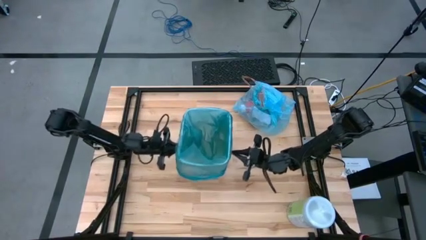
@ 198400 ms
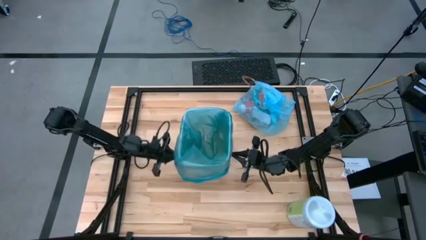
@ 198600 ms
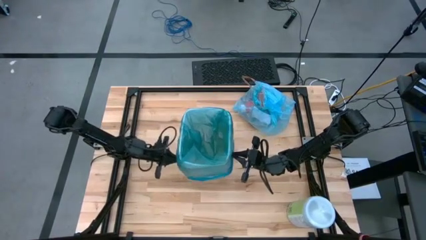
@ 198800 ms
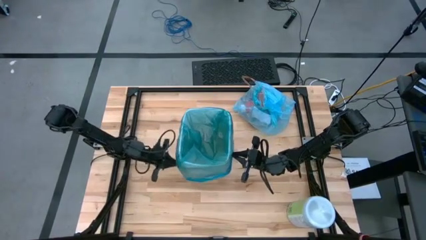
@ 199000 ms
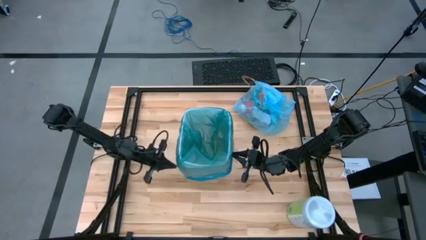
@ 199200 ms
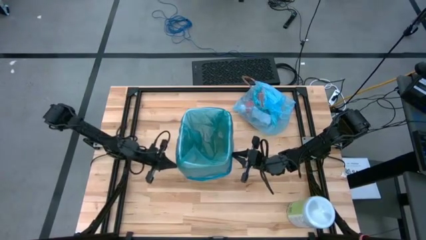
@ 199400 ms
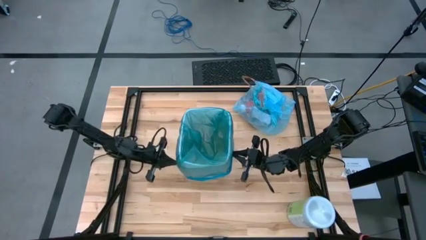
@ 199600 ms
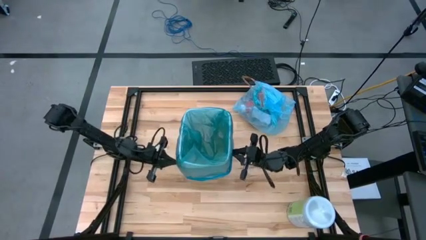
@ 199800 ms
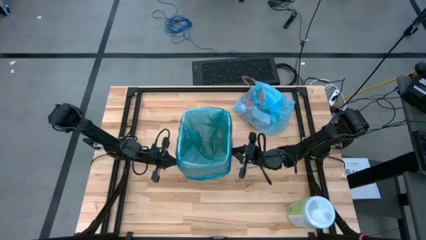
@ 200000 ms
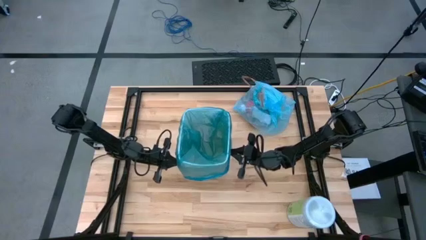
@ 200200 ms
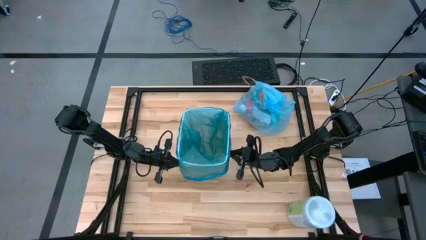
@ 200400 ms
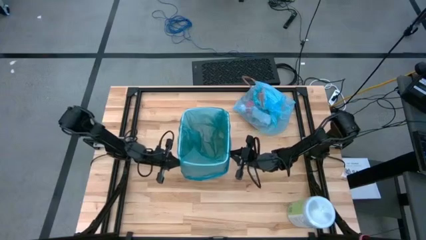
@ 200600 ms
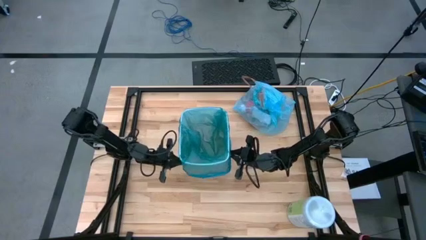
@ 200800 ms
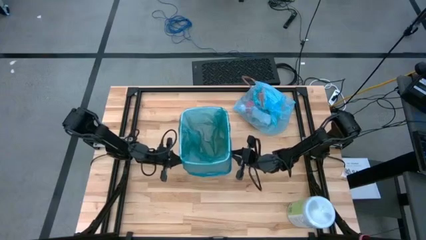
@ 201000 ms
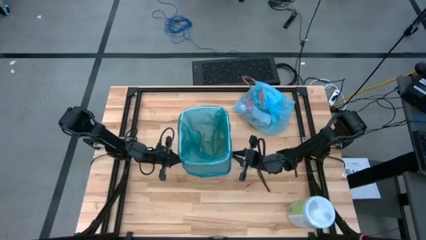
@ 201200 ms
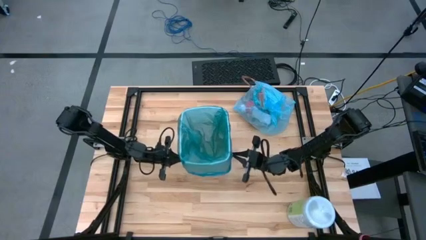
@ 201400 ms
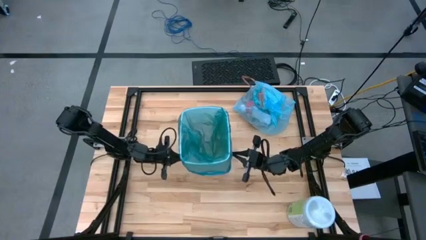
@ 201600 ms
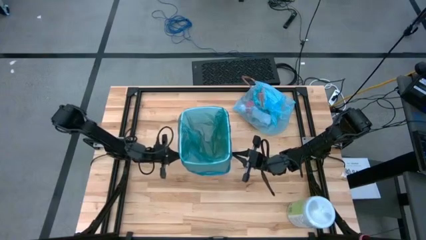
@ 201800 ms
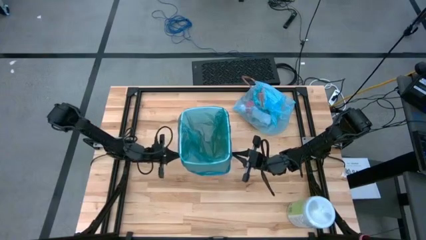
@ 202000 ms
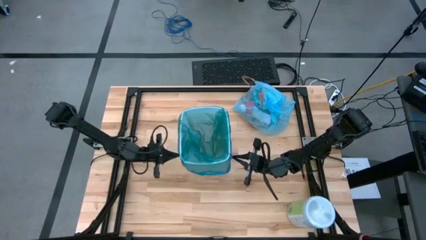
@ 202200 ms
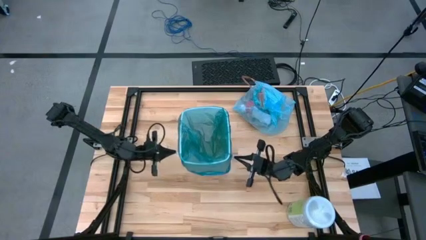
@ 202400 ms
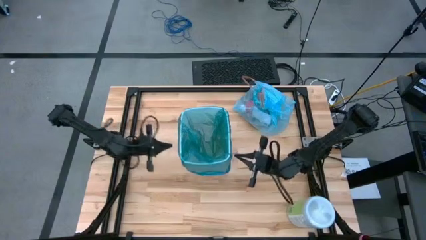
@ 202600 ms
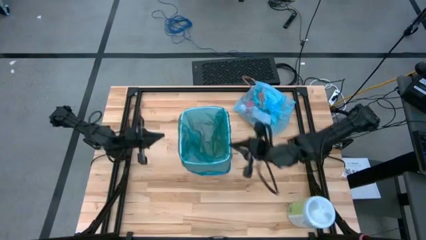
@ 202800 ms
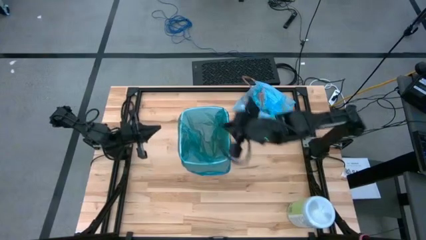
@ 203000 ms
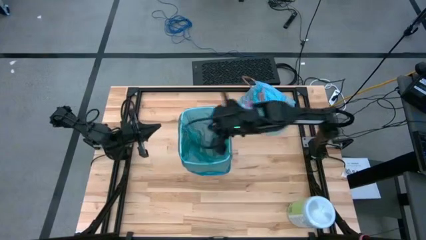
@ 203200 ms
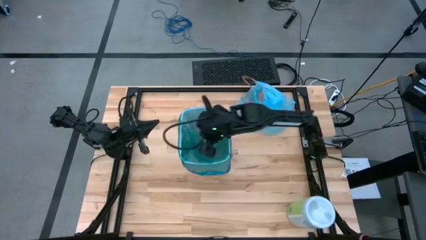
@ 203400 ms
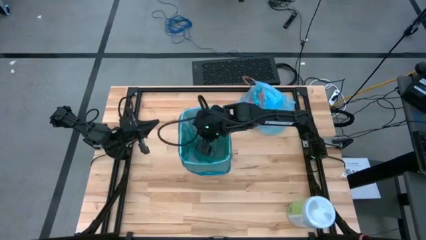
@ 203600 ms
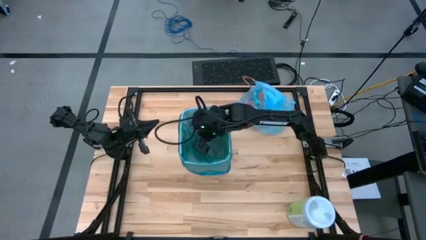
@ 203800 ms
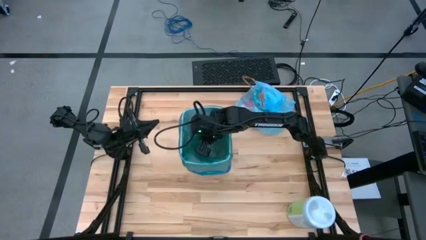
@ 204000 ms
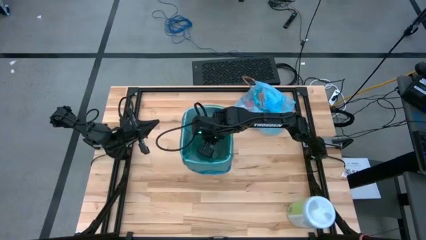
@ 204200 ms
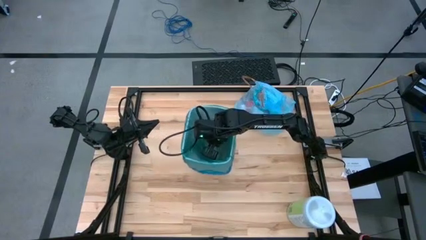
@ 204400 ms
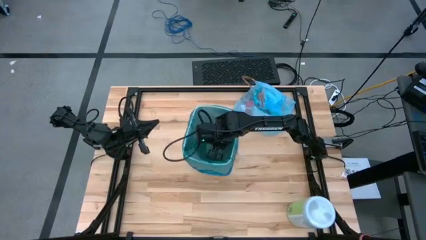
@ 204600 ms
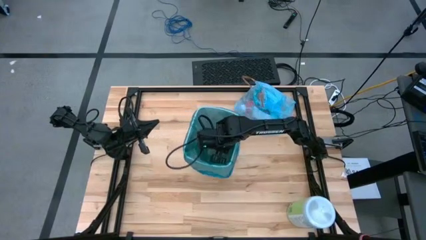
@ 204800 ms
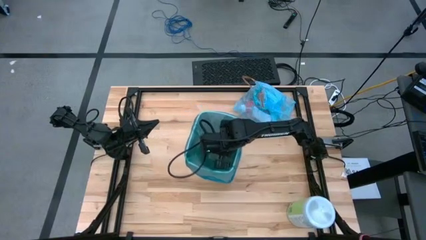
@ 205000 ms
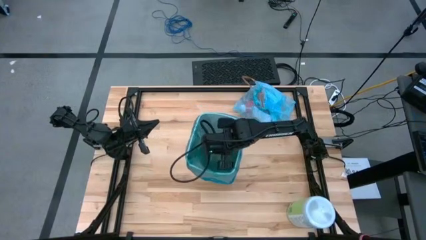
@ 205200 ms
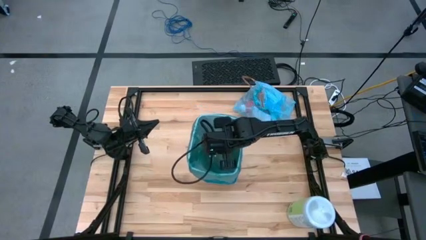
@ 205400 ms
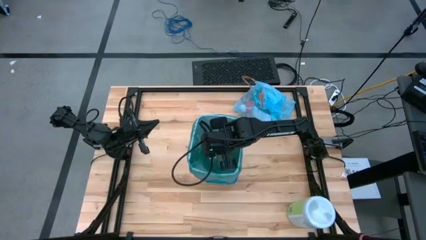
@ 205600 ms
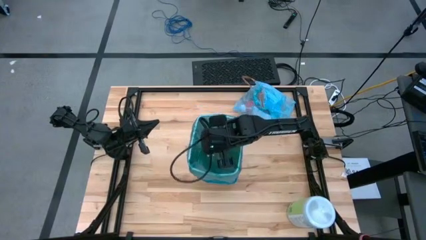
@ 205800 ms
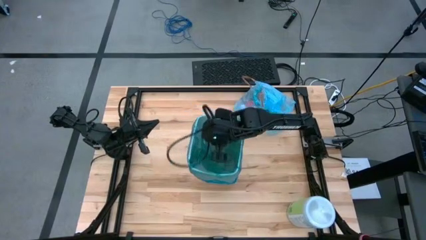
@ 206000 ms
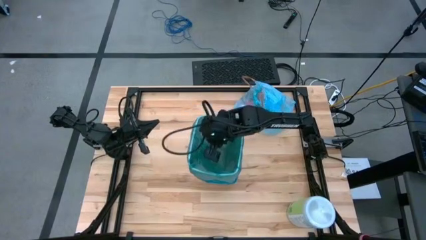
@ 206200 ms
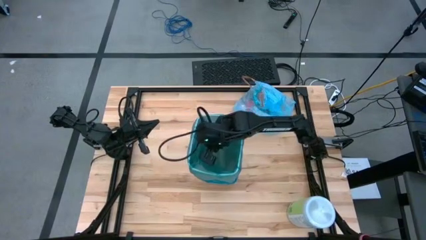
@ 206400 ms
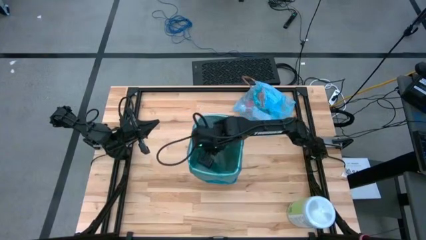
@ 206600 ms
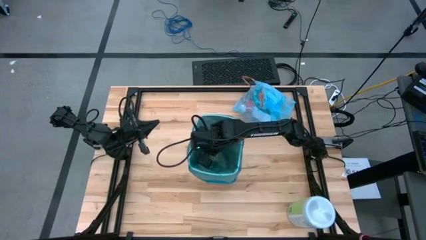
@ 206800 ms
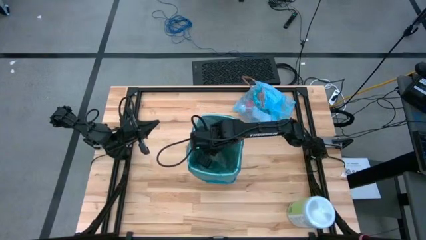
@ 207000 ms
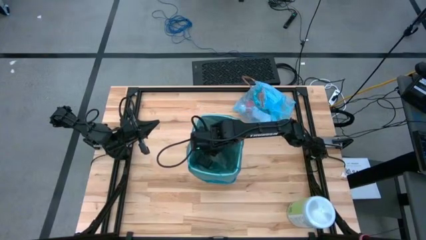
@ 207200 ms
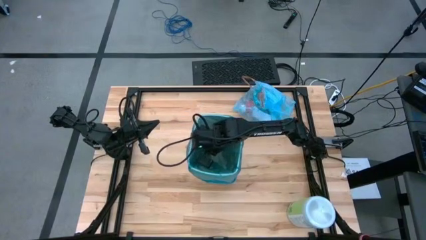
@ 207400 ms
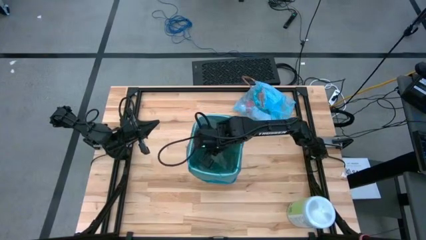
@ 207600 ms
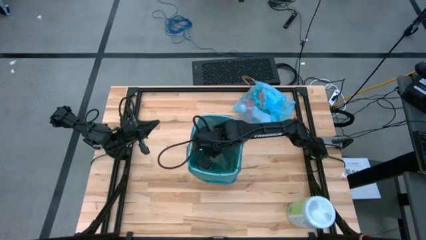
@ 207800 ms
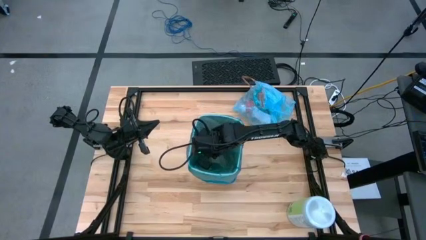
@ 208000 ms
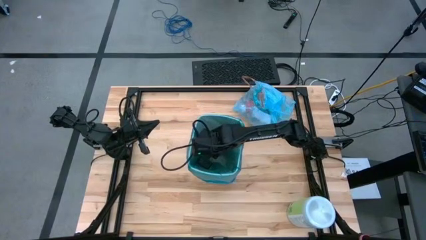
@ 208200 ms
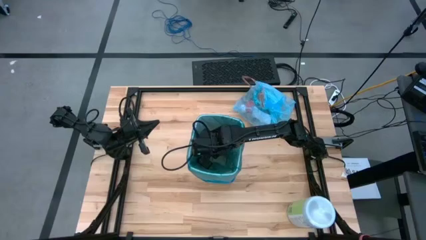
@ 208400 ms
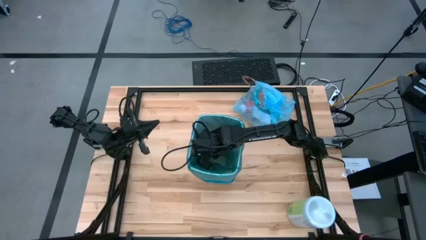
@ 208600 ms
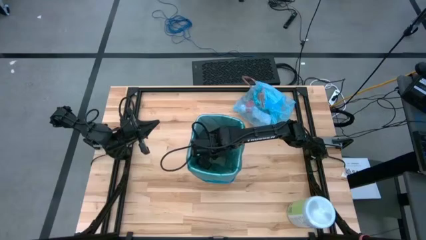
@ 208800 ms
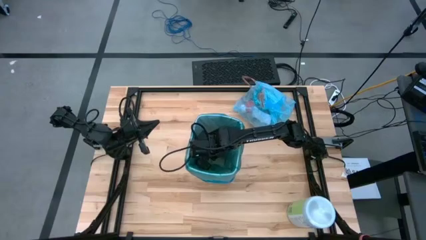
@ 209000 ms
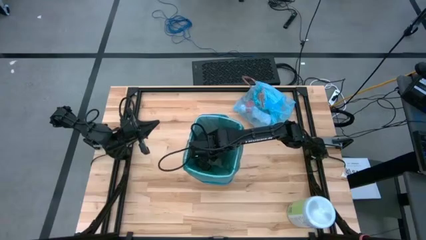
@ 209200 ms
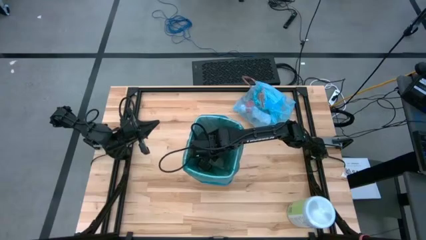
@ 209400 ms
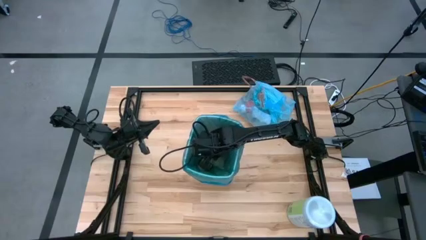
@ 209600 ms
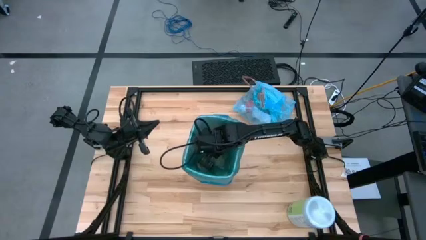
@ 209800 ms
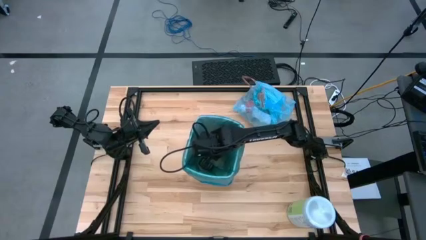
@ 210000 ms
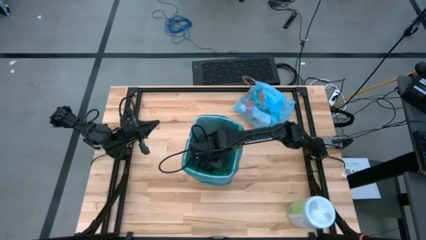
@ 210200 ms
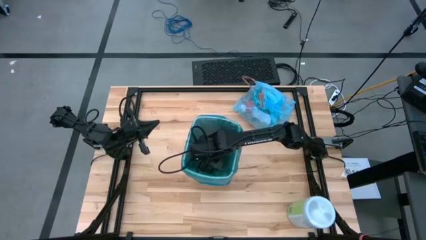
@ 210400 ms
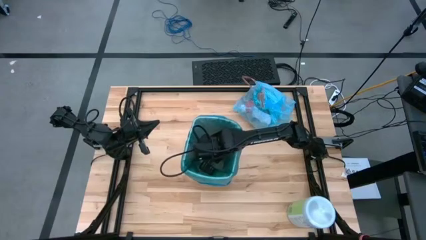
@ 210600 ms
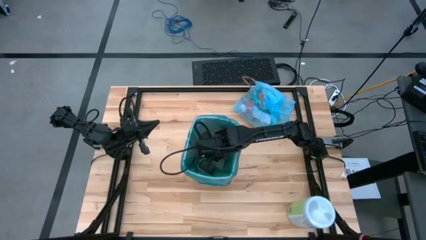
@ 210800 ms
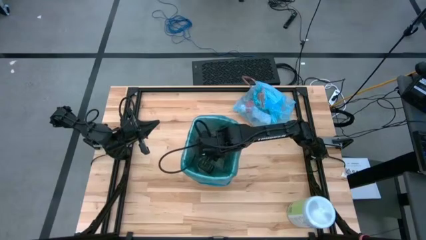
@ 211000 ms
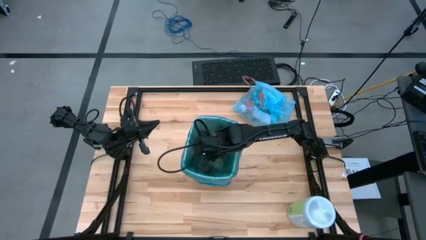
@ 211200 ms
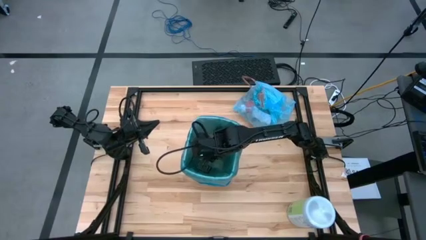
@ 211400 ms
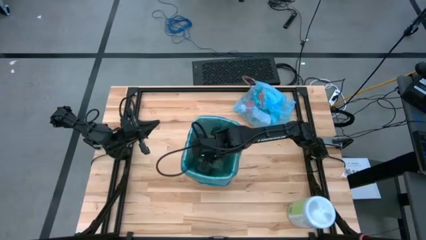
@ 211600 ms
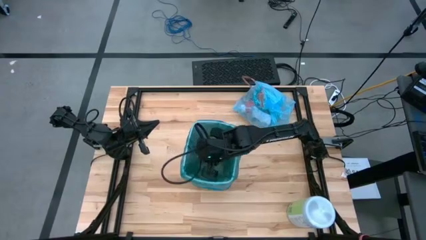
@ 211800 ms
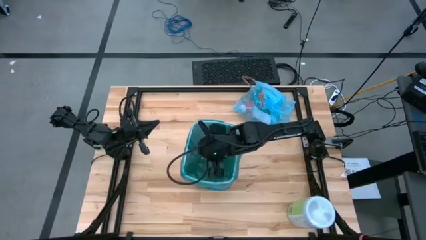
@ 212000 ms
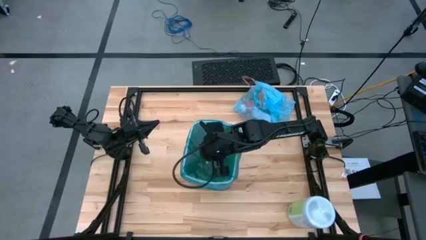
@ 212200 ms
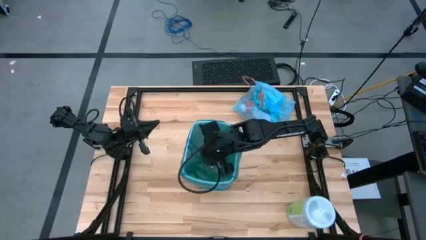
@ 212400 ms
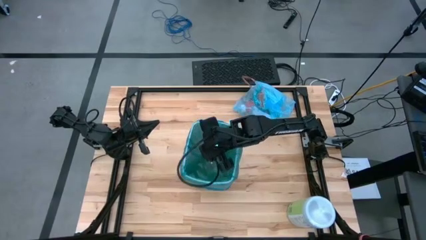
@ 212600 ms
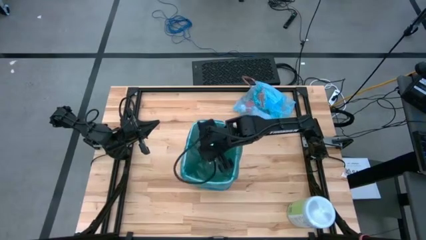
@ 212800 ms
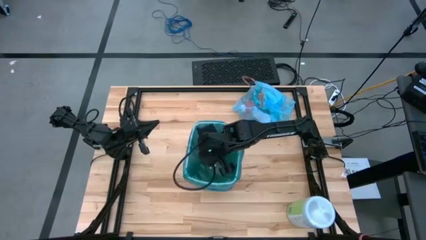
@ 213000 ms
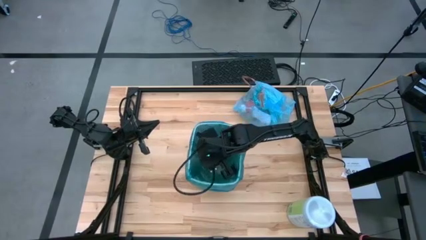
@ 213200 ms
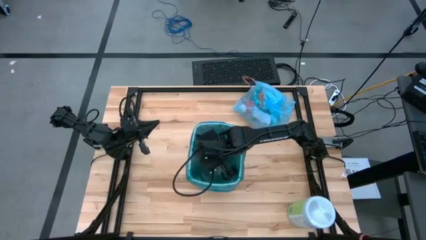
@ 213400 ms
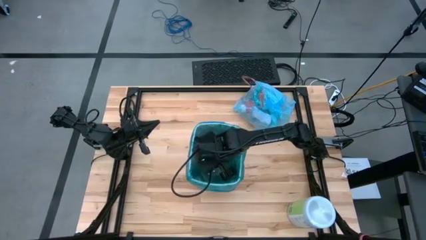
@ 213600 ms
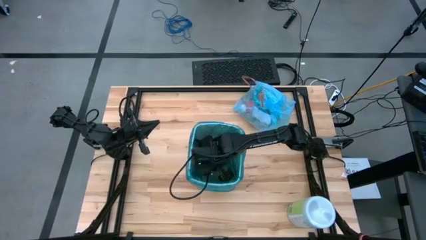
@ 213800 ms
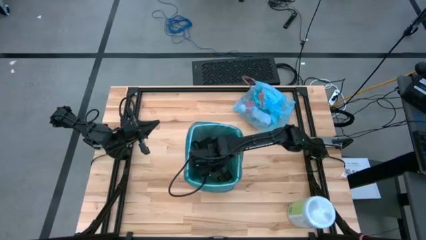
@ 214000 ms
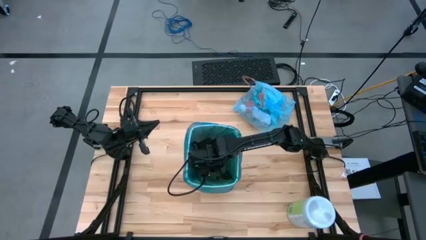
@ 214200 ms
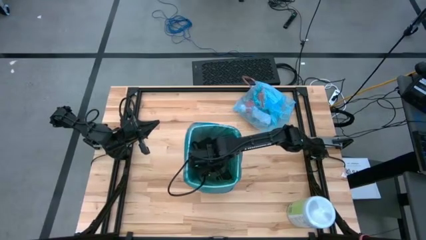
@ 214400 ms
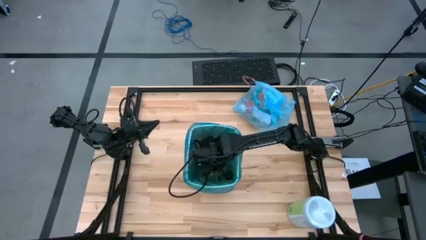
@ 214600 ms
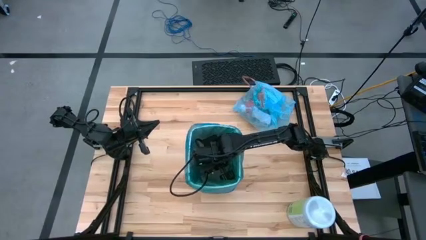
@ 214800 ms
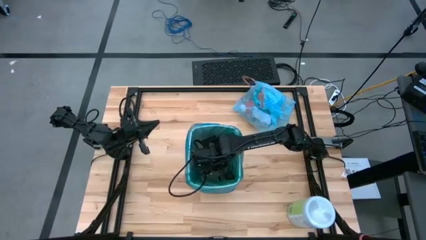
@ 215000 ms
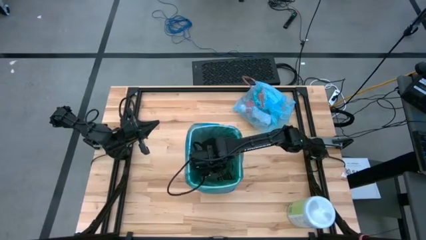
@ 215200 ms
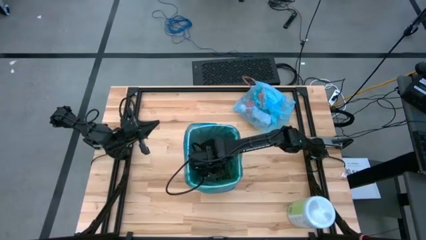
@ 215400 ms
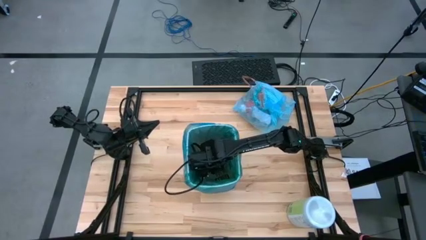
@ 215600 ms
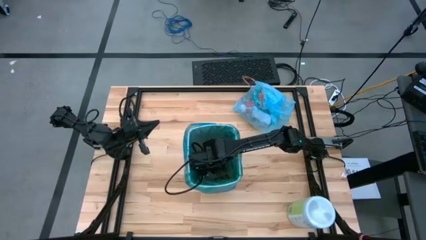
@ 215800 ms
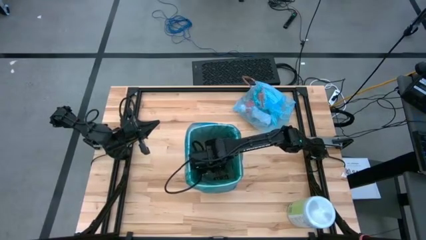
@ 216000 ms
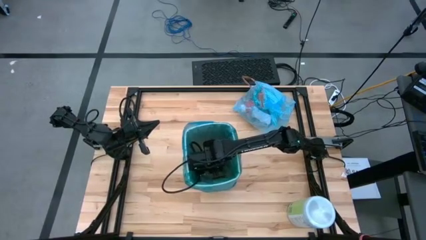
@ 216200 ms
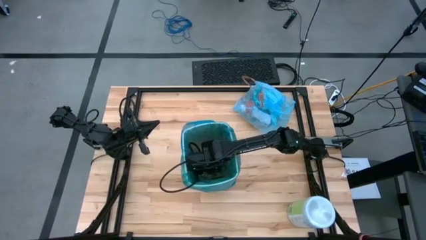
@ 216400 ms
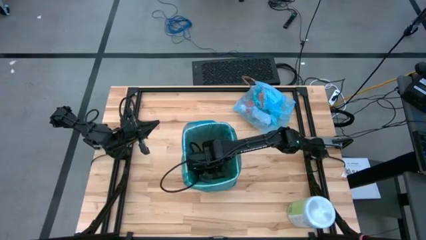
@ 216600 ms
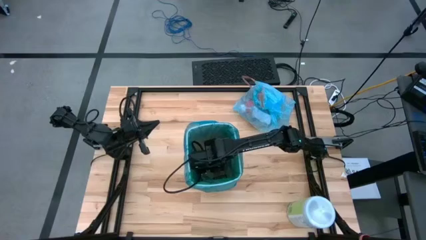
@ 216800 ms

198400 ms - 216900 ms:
Task: place trash/remove bag and relplace
Insert a blue trash bag into the trash bin
